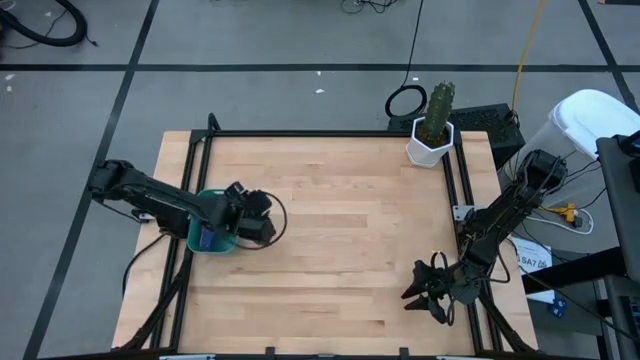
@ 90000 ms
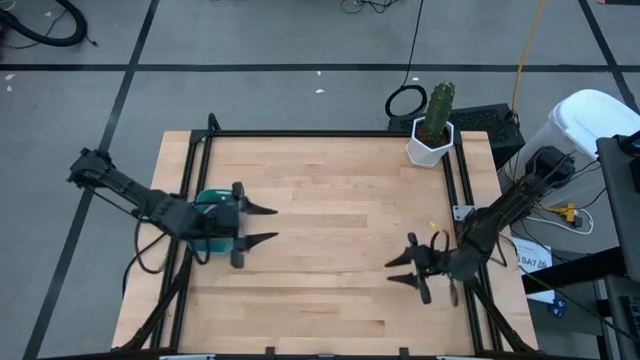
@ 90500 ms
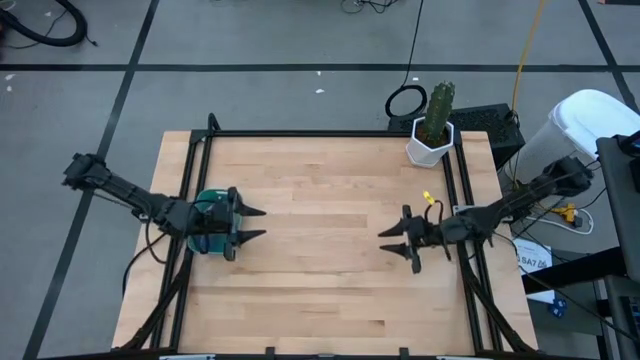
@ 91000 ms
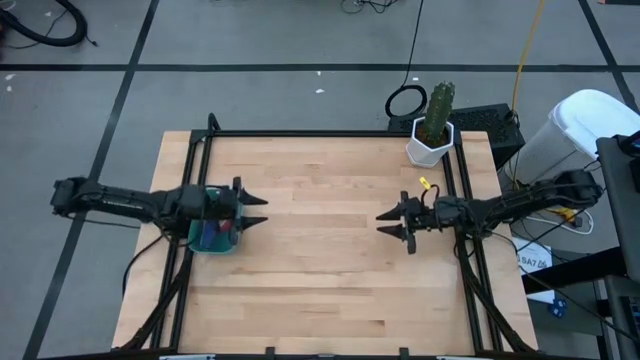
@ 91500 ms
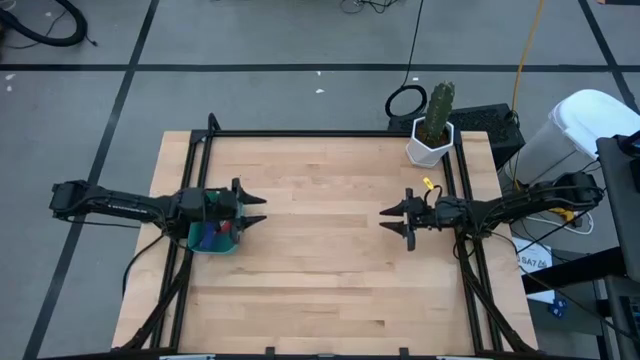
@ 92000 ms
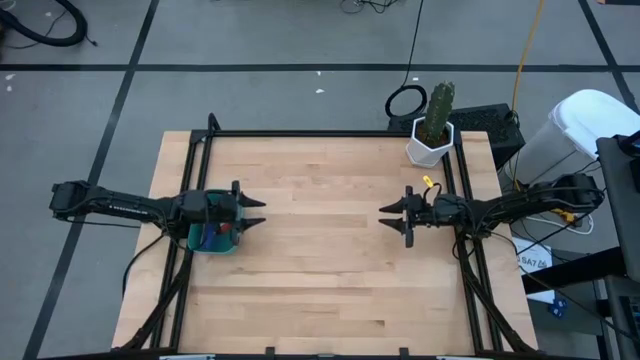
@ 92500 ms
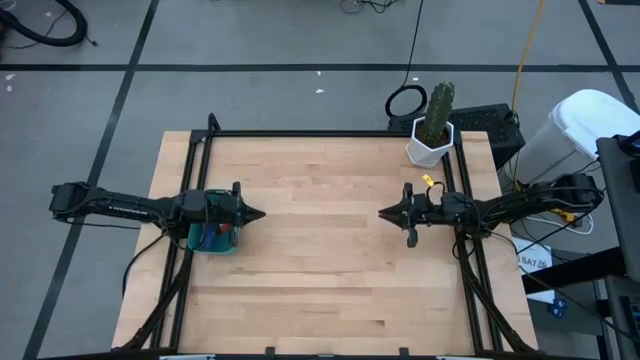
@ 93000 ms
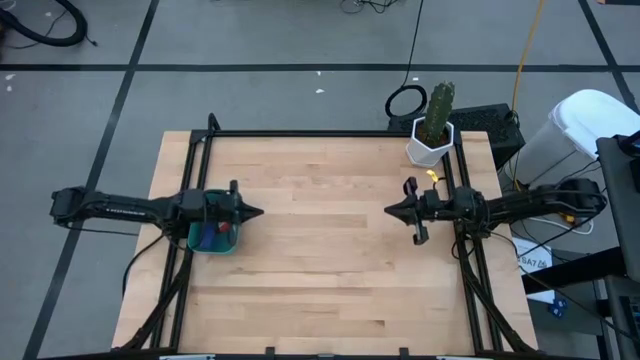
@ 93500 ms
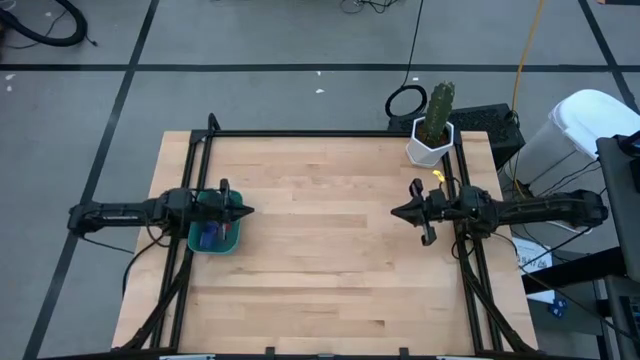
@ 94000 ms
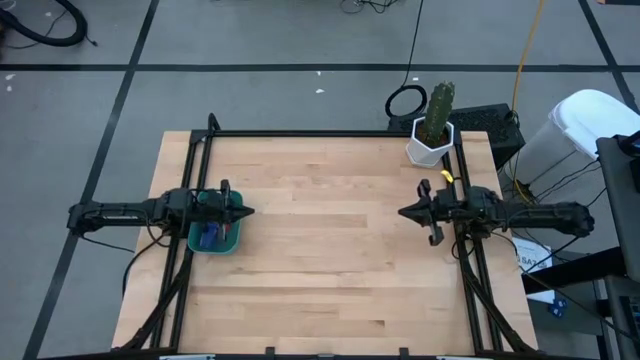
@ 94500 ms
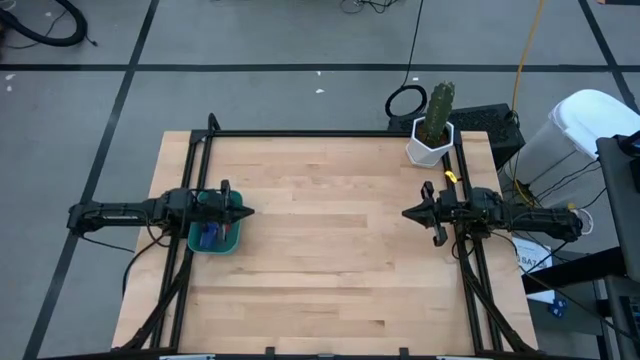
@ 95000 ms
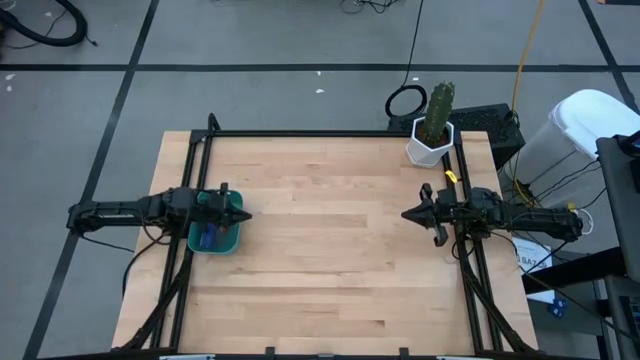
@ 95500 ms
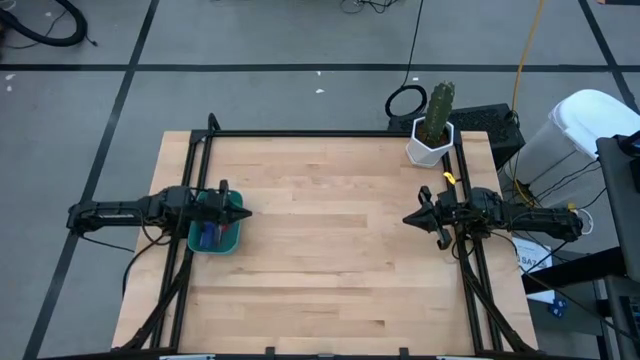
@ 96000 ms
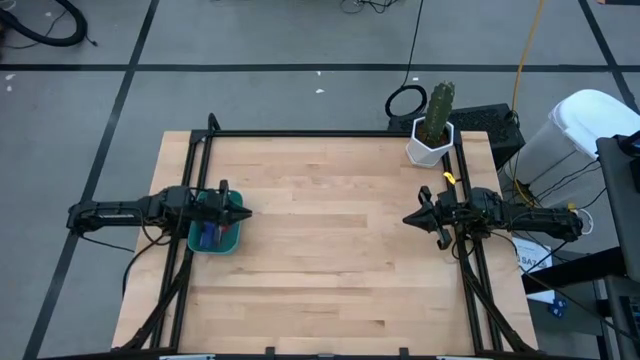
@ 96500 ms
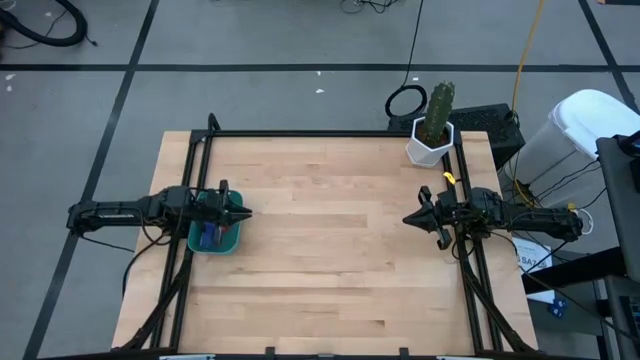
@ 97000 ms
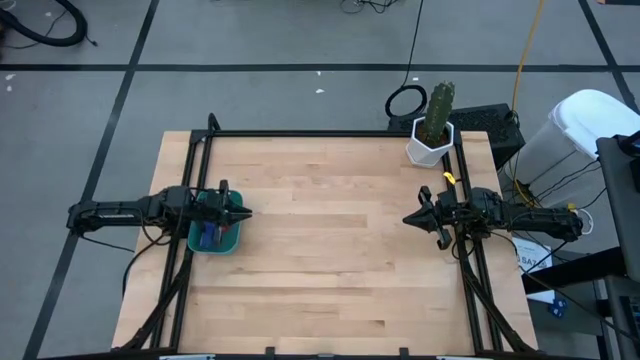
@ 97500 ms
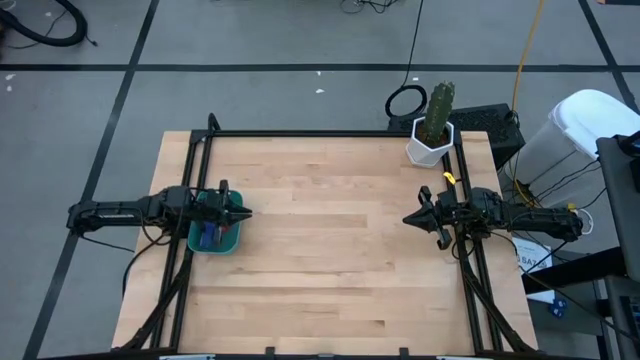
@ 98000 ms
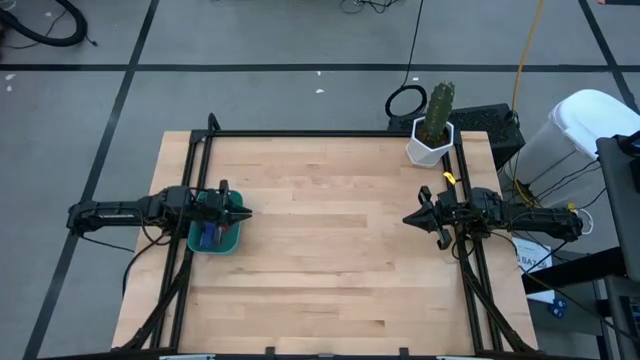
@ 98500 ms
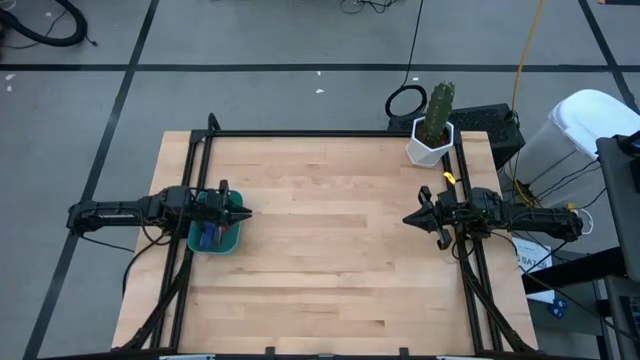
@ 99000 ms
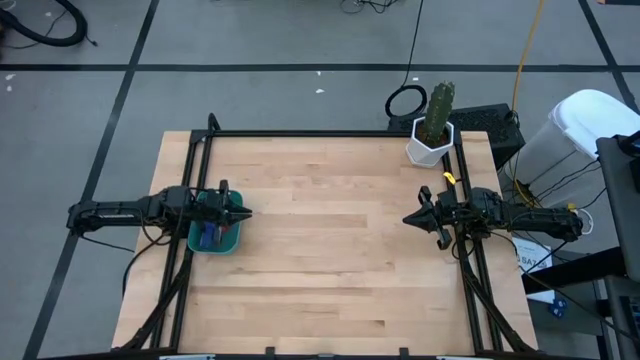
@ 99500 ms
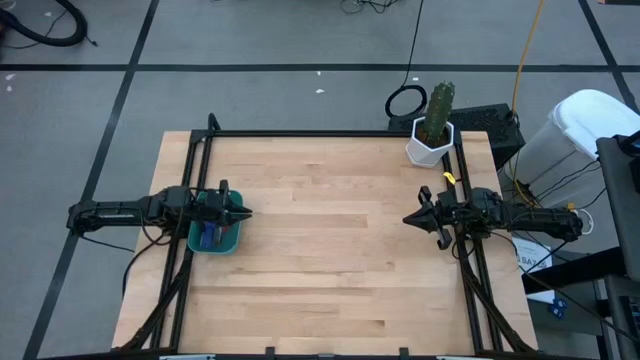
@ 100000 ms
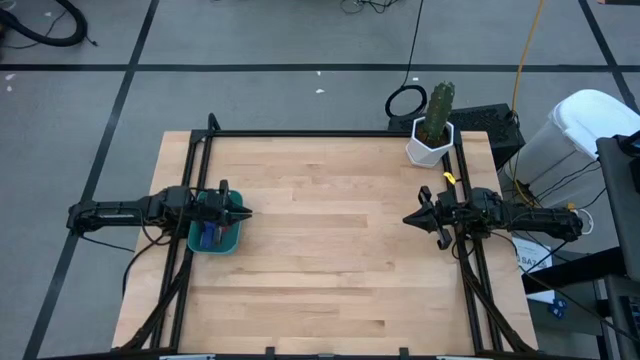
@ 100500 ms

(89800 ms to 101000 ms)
Task: Nest measuring cups in basket
Return to Home Position

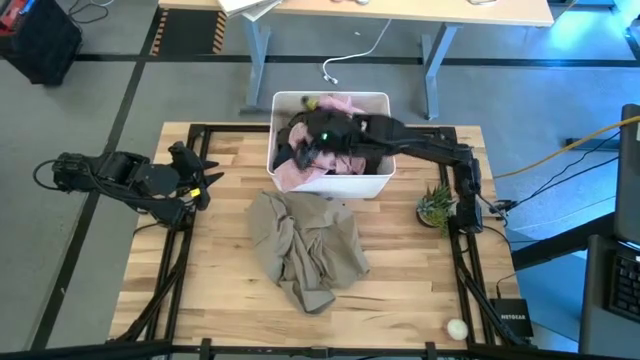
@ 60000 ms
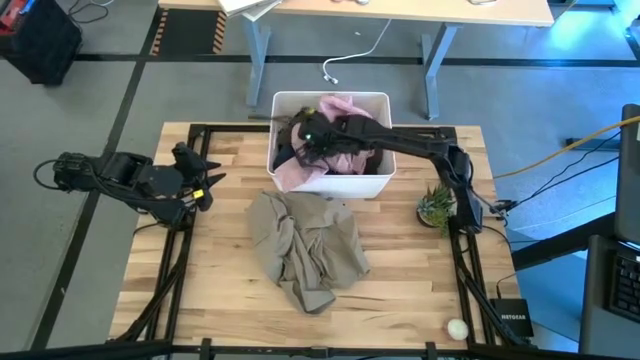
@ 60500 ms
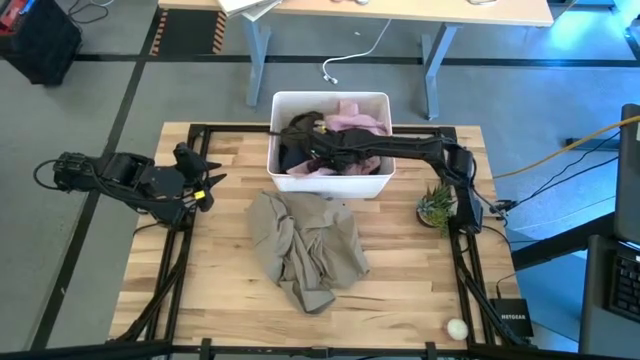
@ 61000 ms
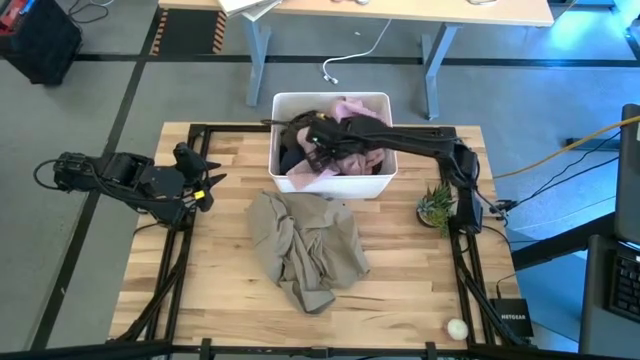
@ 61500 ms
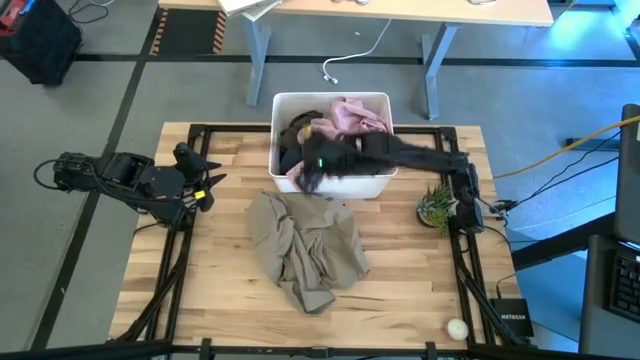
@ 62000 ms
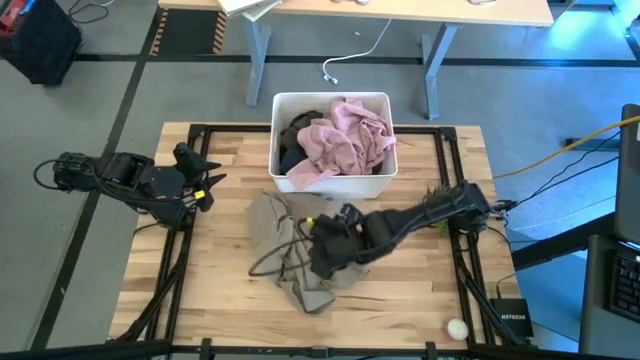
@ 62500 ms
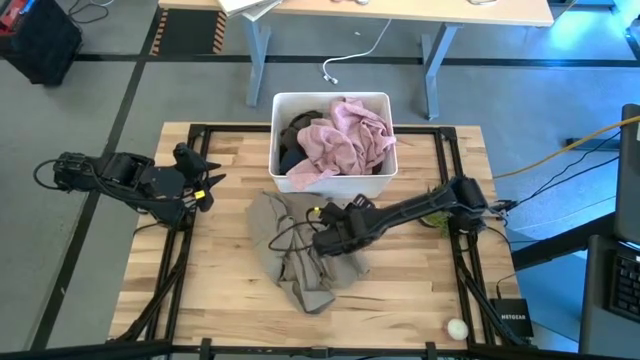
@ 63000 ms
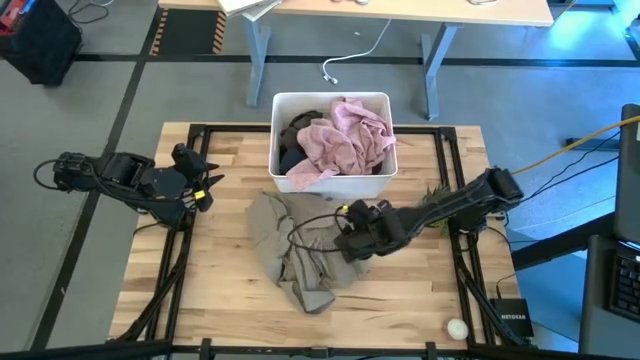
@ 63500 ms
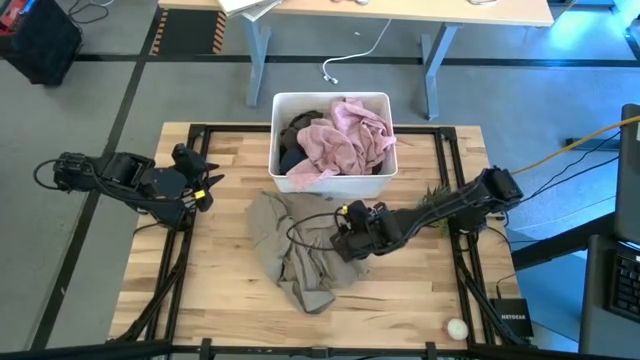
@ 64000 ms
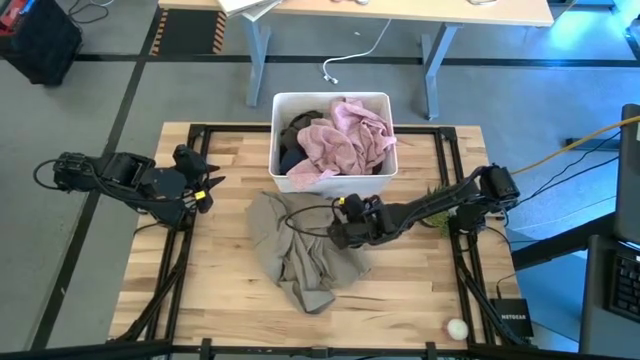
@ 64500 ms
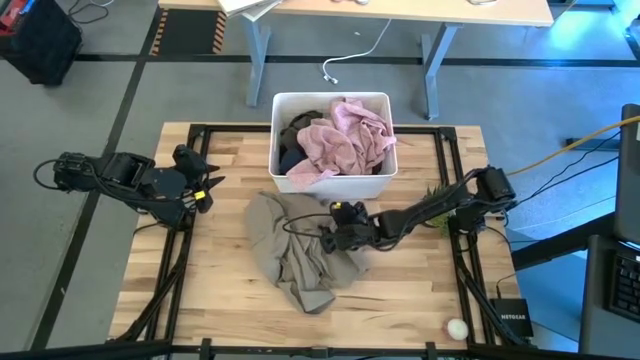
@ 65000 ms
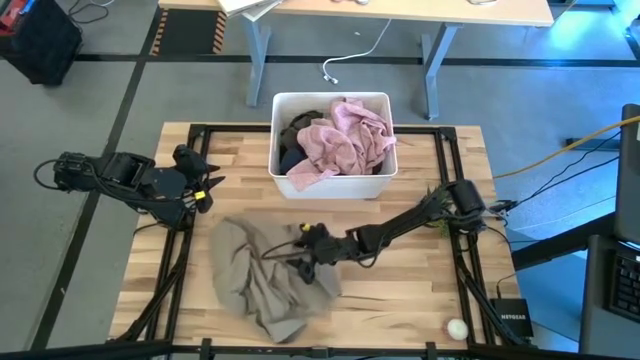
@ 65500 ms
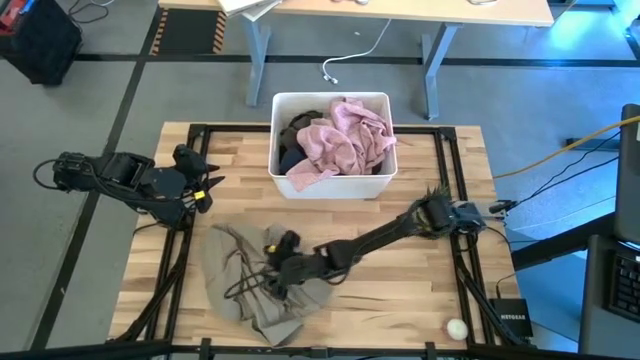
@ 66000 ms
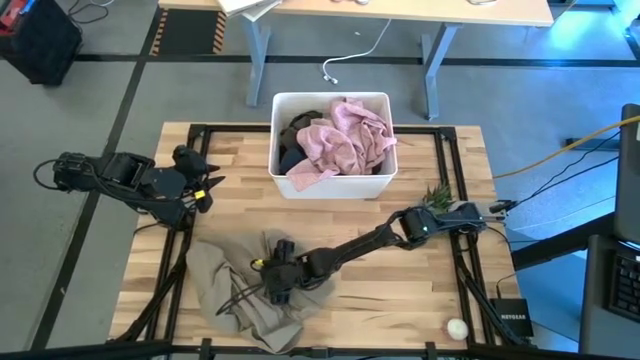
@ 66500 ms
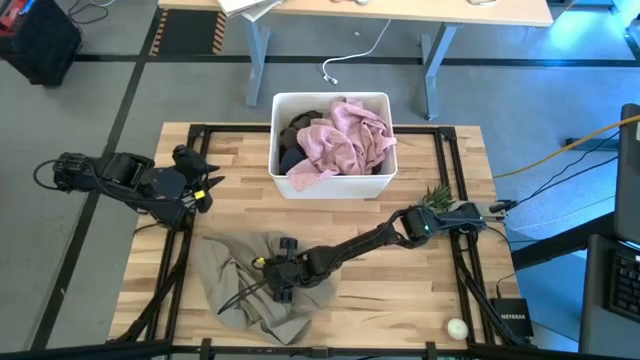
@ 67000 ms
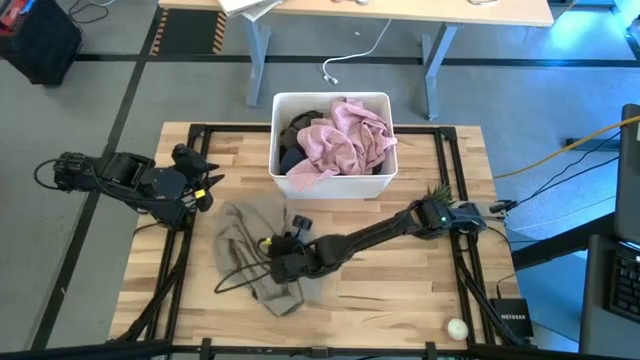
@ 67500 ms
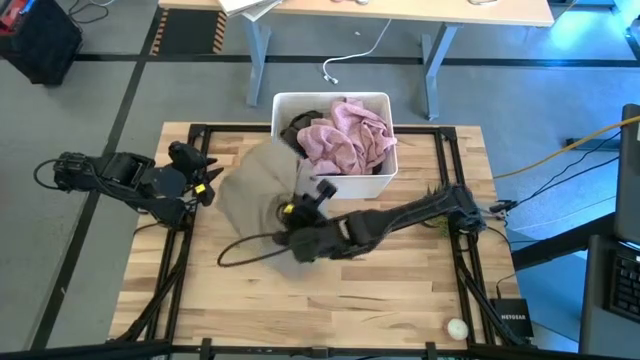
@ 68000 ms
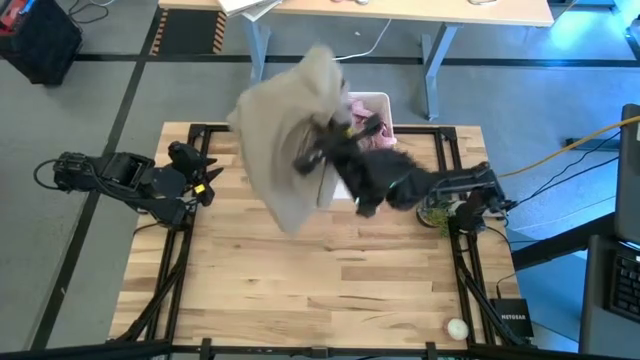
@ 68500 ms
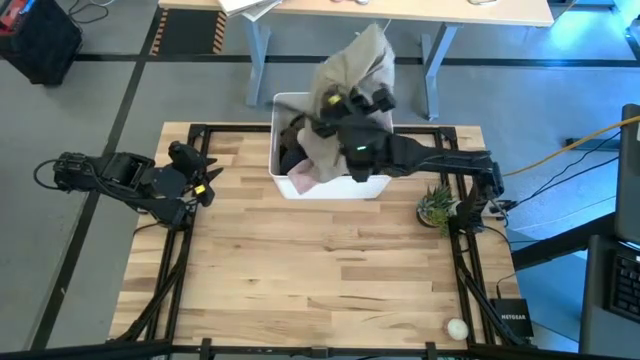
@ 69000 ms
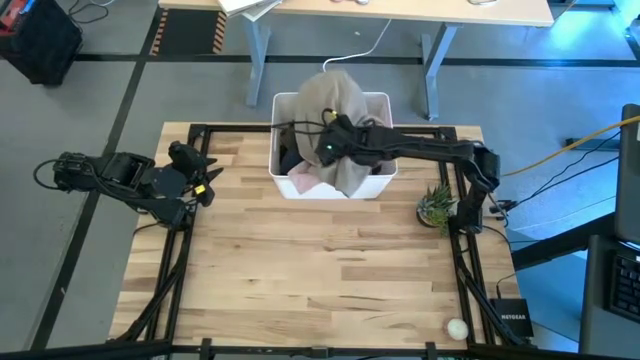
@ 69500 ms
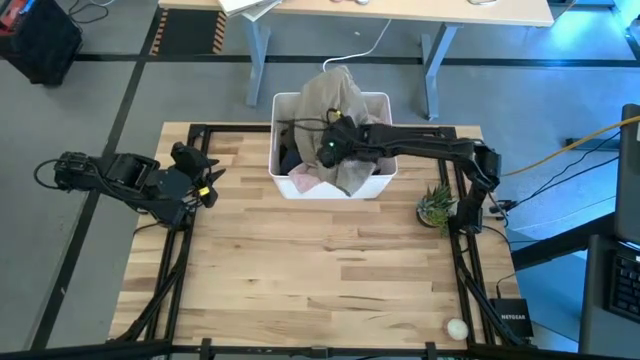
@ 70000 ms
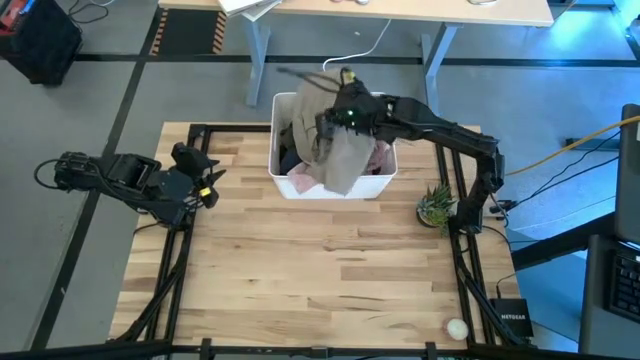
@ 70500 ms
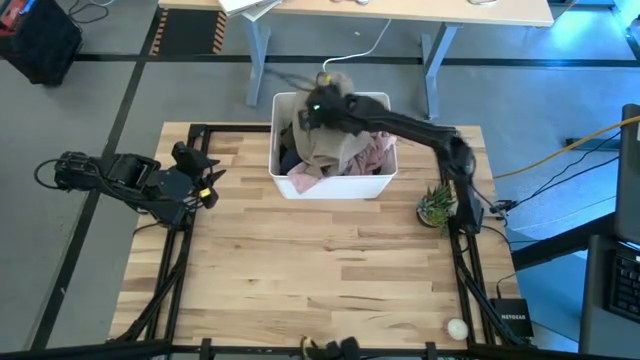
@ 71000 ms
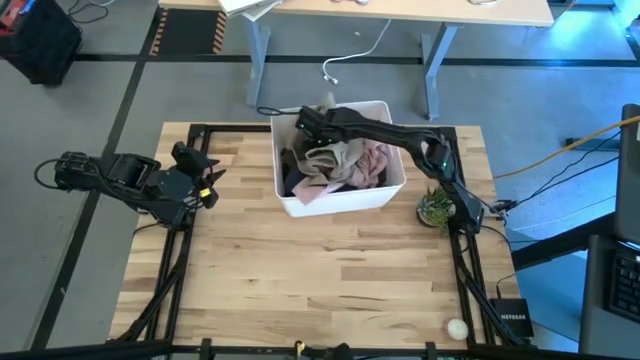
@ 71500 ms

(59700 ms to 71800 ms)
Task: Sort clothes
Put the brown shorts into the white bin
